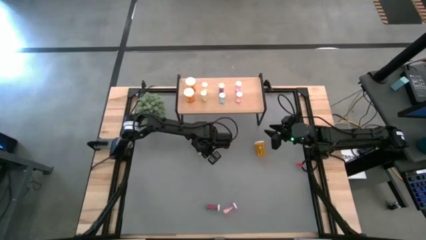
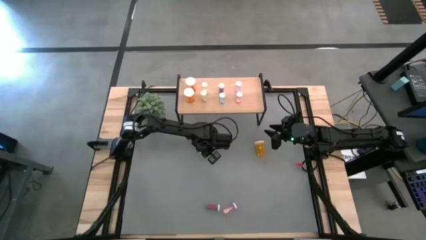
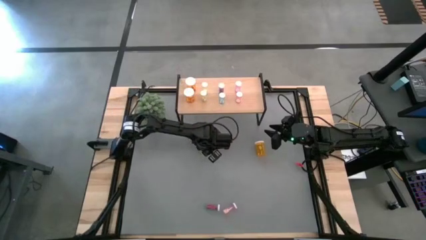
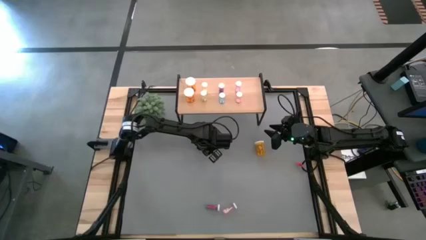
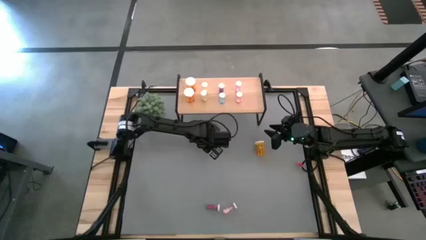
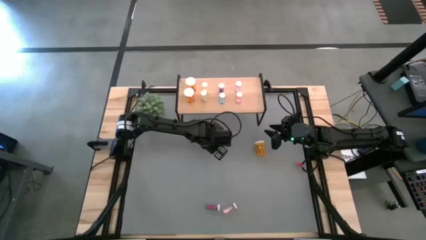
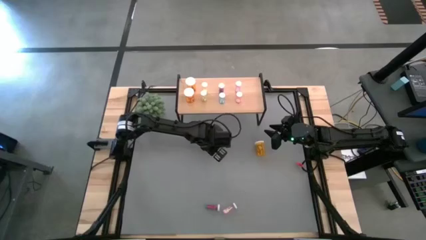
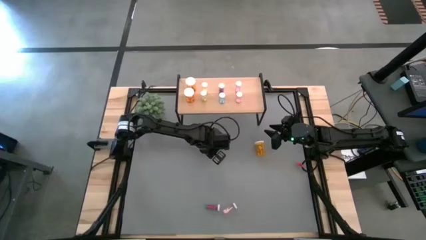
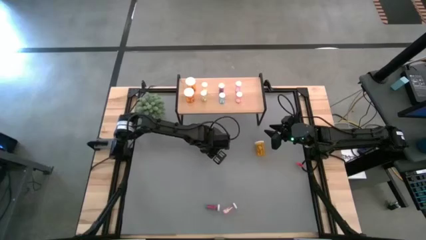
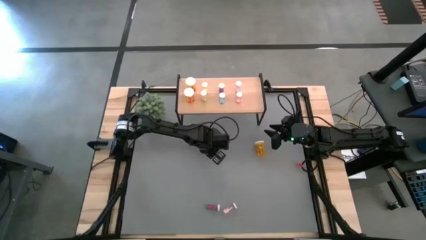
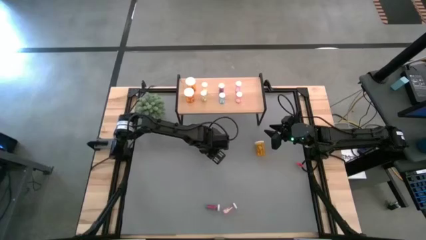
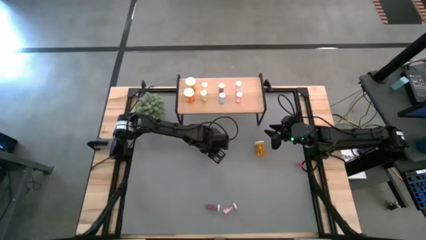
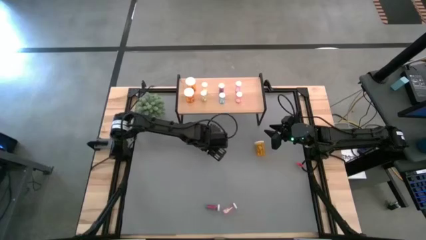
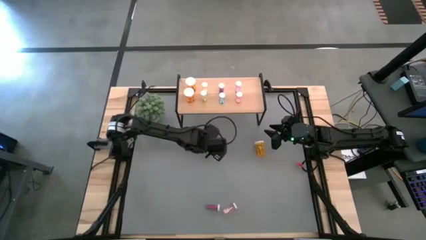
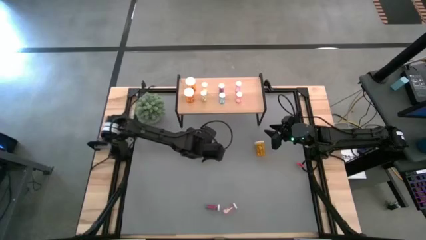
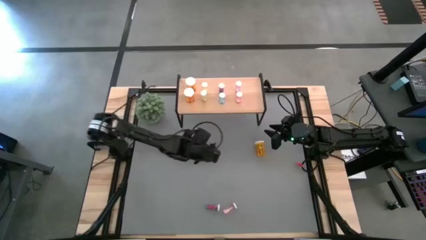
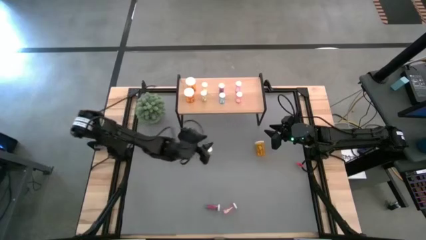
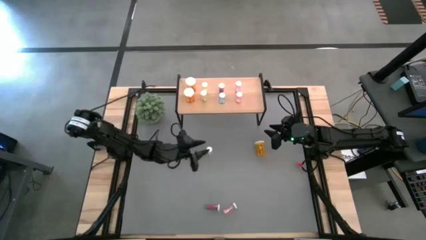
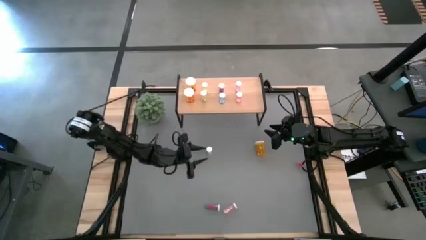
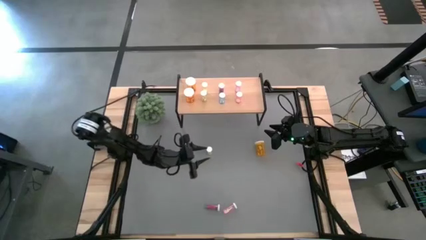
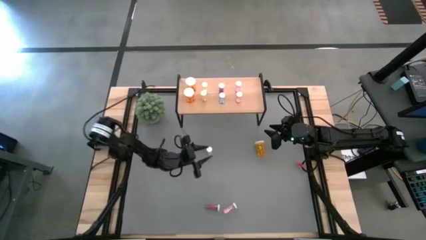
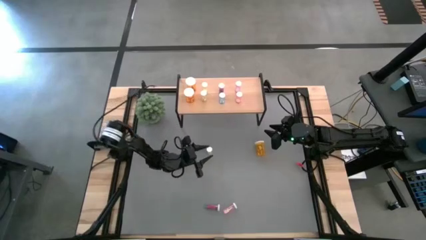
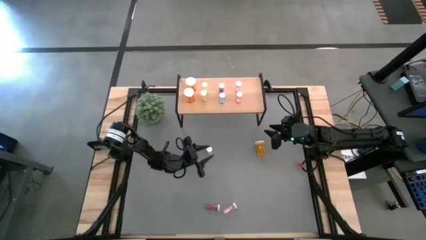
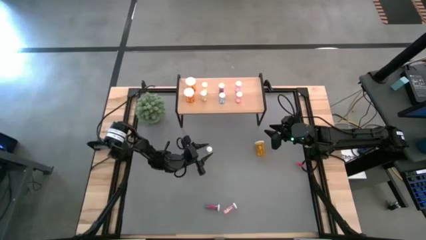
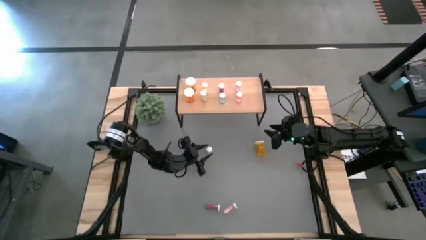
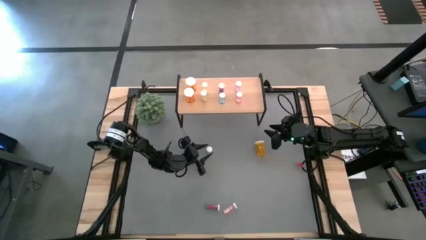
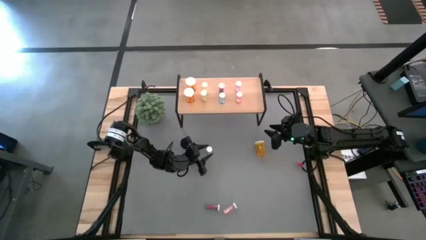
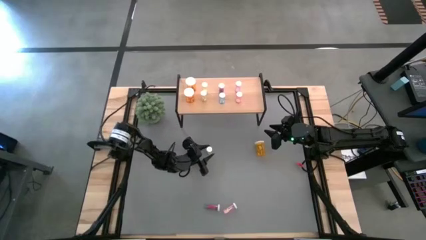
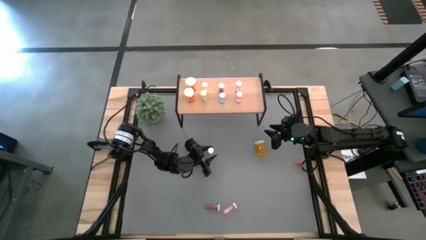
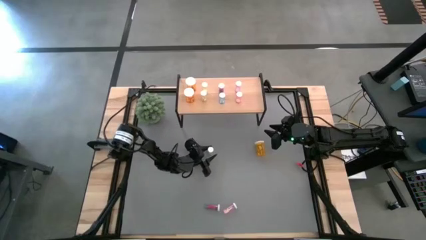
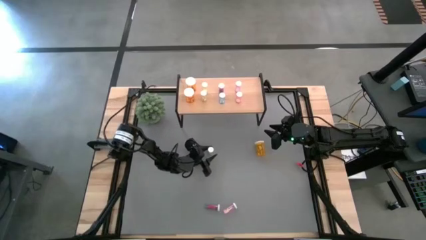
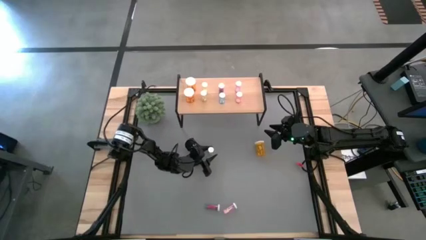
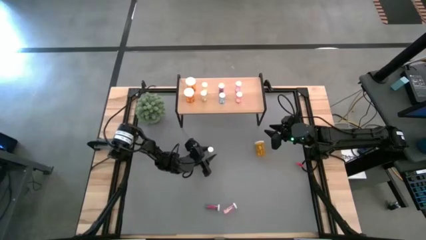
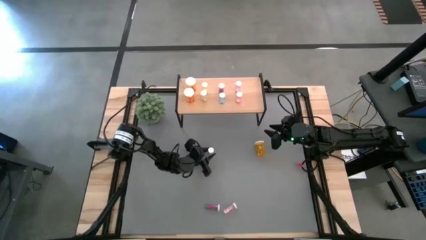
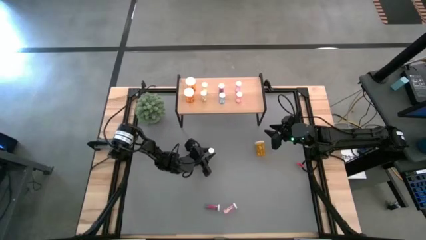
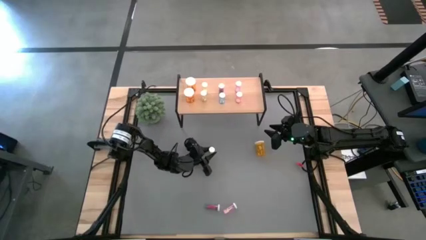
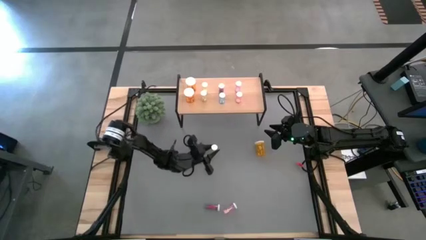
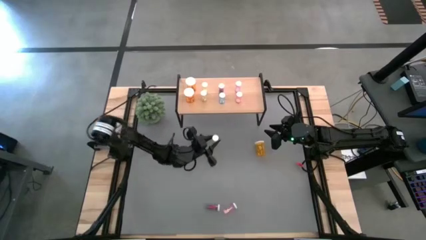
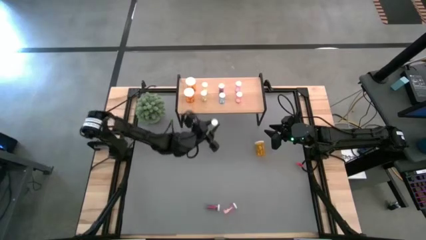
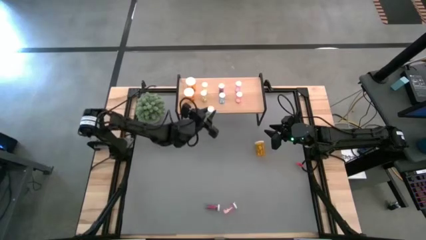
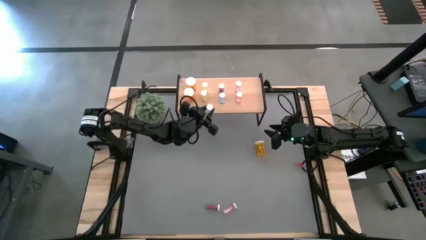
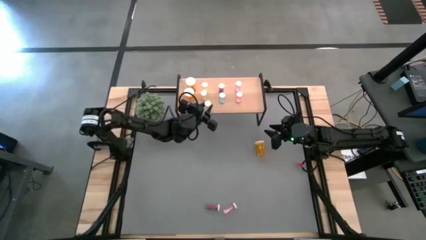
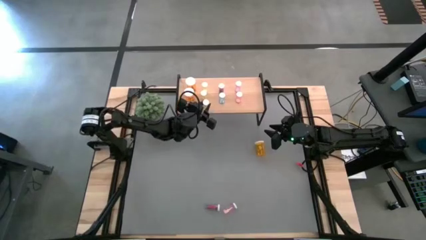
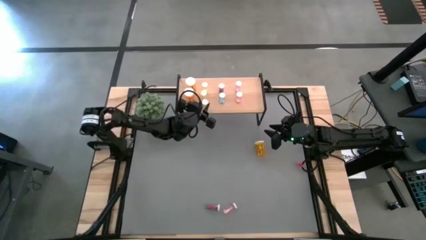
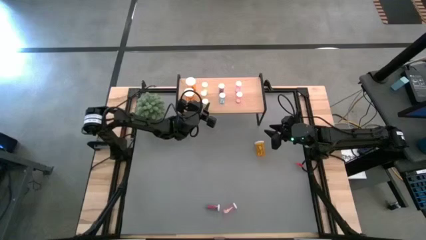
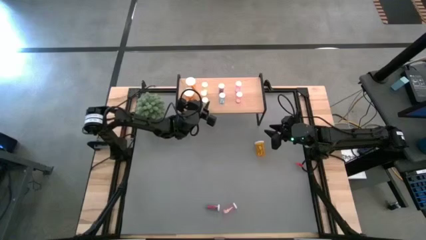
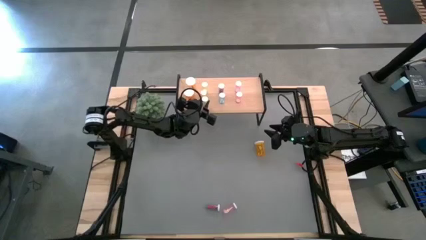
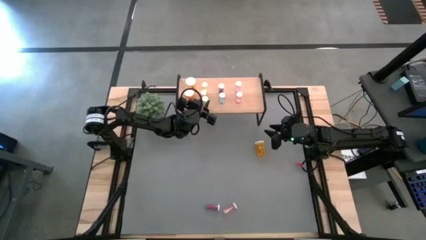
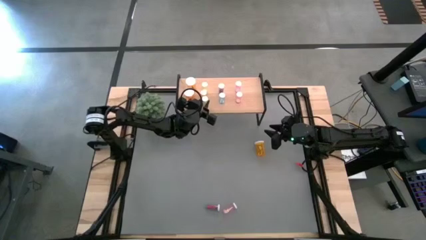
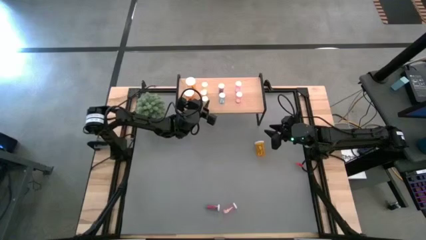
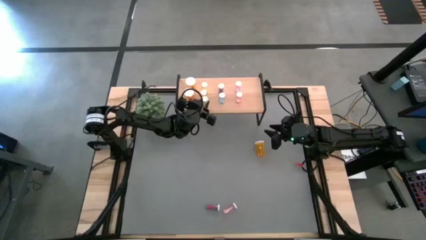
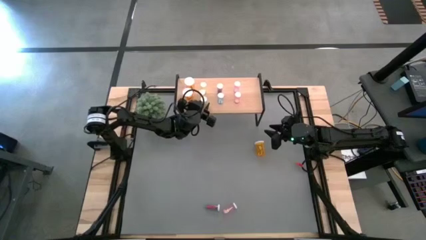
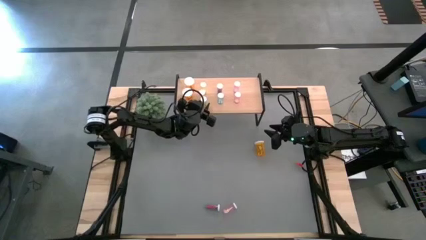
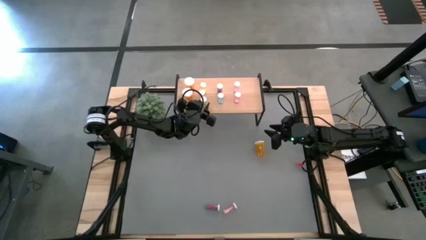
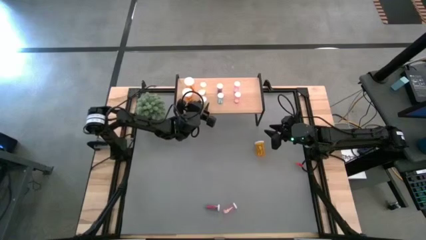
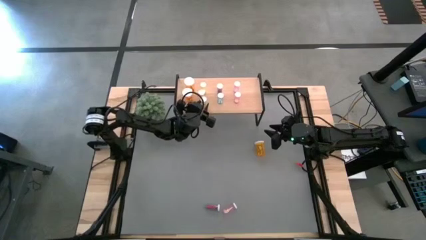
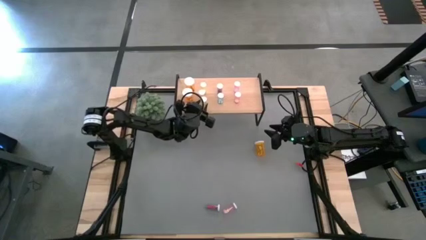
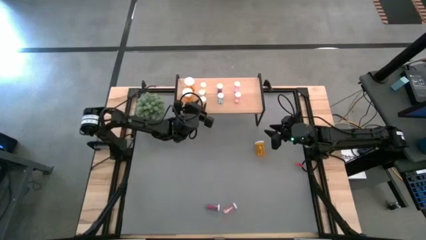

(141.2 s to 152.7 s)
Task: Pick and place medicine bottles onto shelf by color
Put the yellow pill bottle on the shelf aligned with the other yellow pill bottles

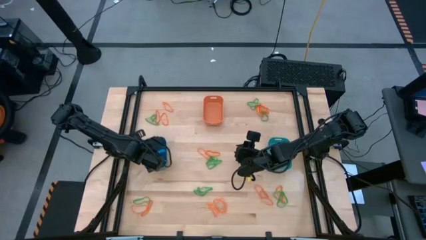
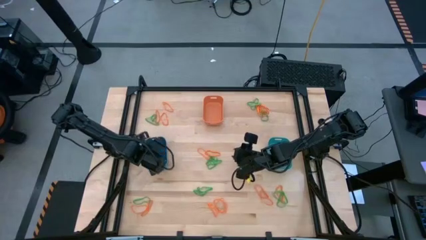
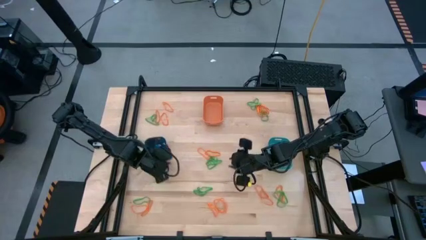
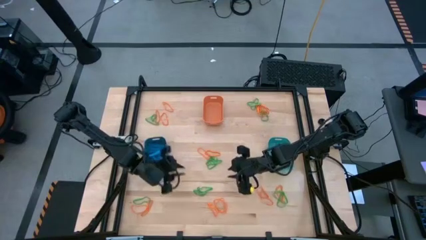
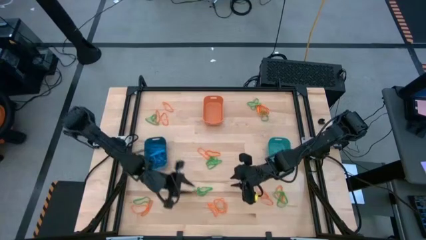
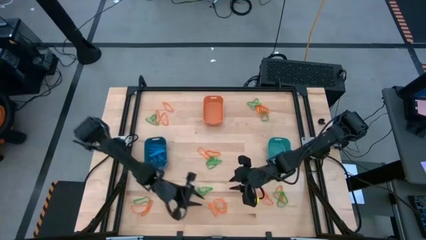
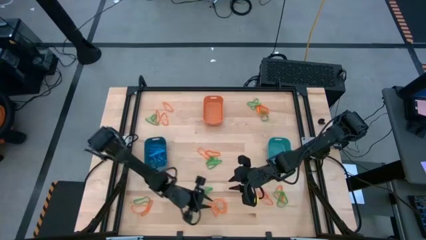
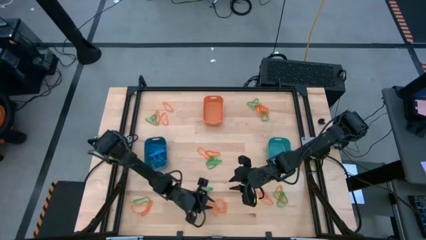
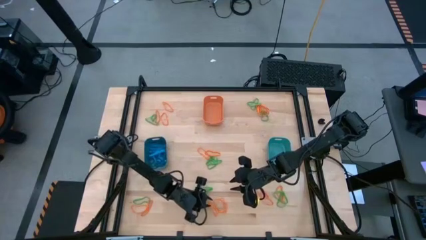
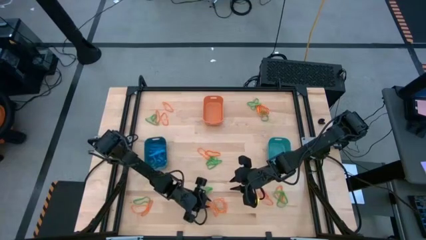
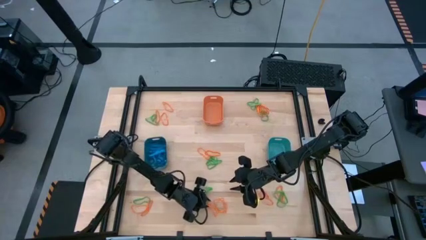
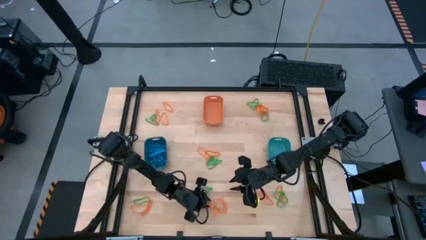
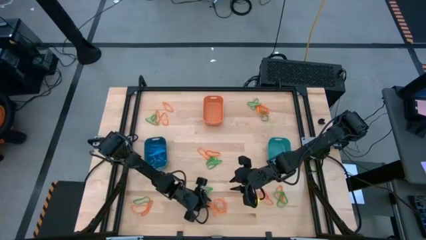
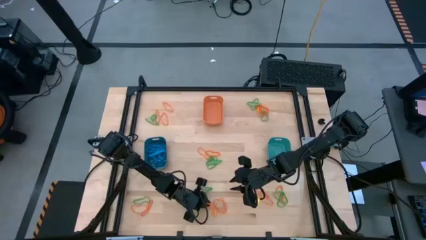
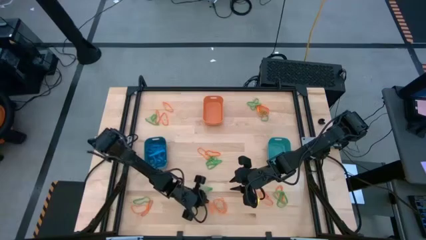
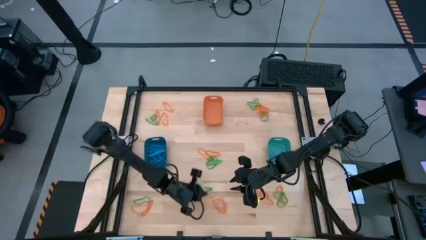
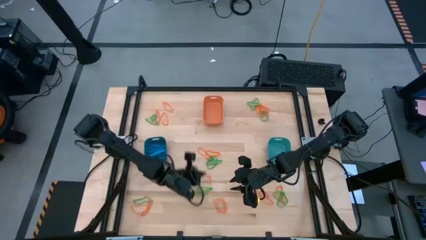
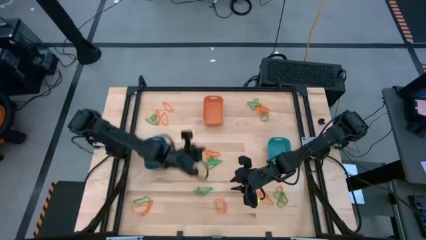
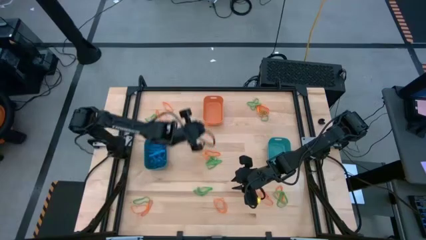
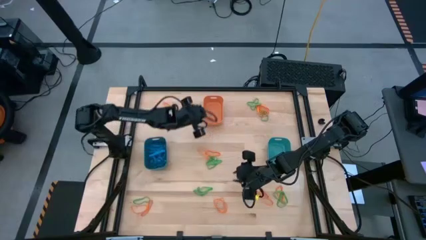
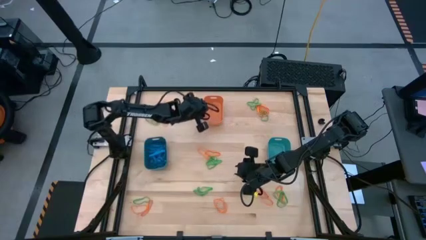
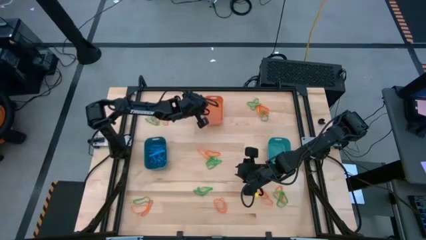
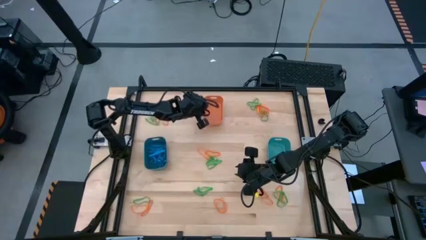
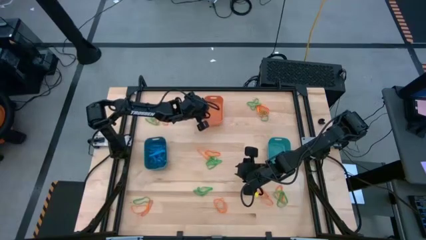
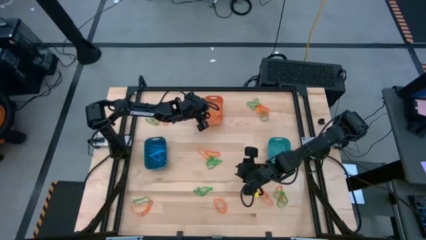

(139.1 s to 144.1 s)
Task: Sort rubber bands into baskets
Put the orange rubber band into the orange bin
